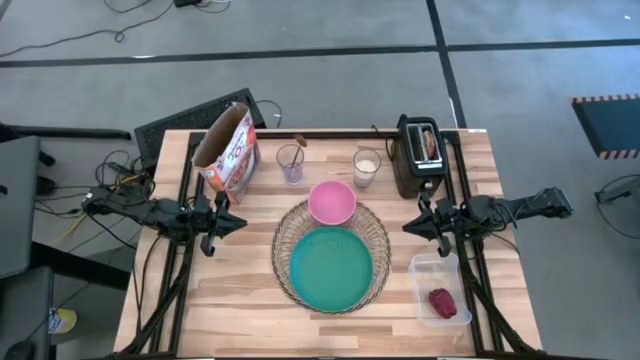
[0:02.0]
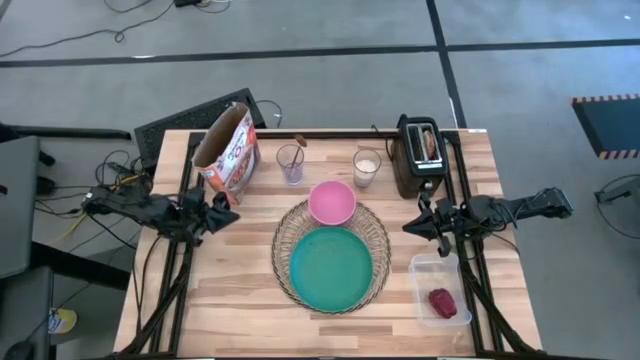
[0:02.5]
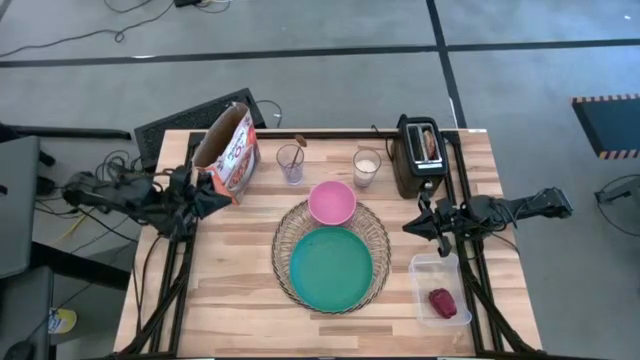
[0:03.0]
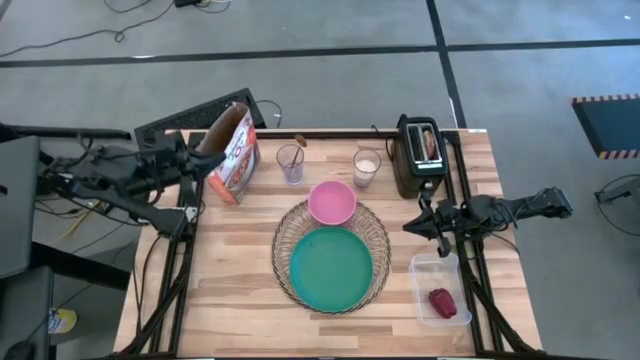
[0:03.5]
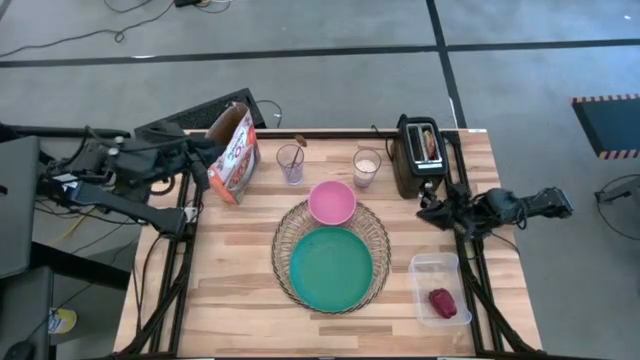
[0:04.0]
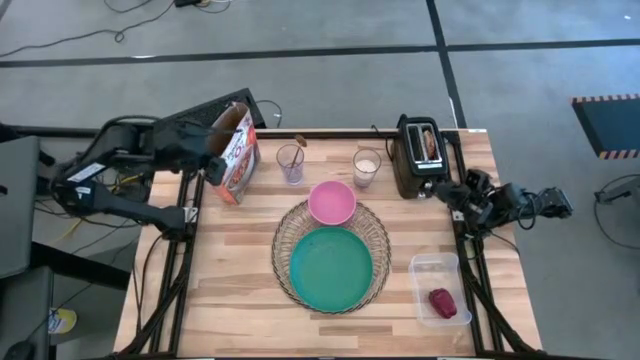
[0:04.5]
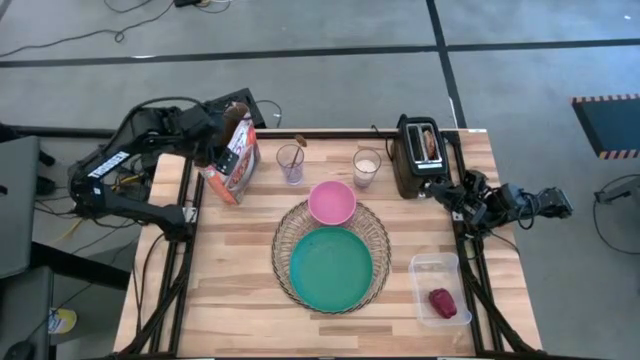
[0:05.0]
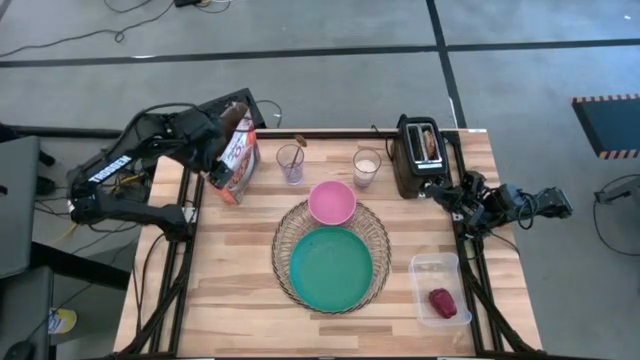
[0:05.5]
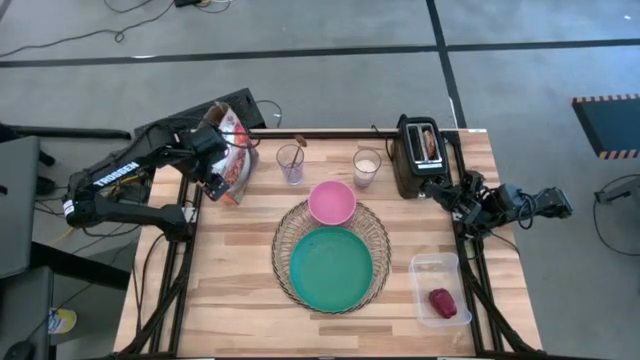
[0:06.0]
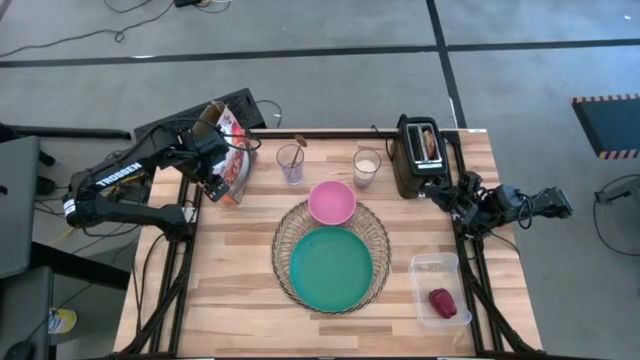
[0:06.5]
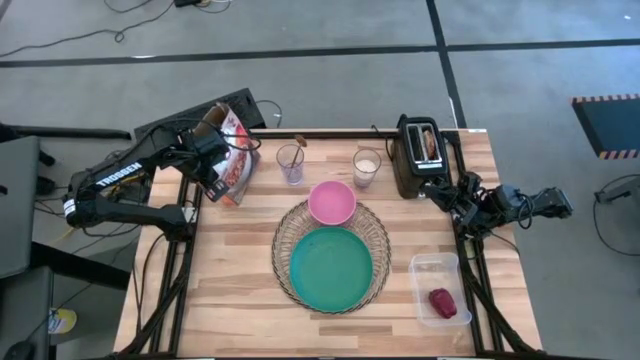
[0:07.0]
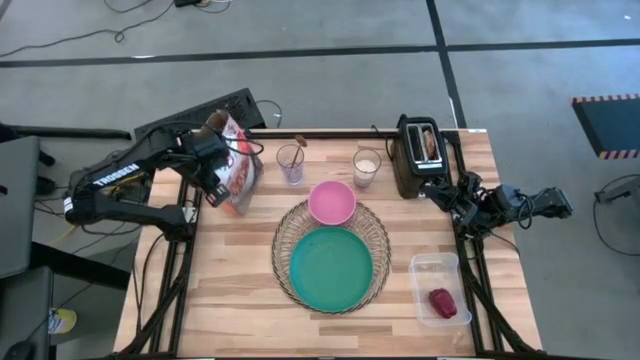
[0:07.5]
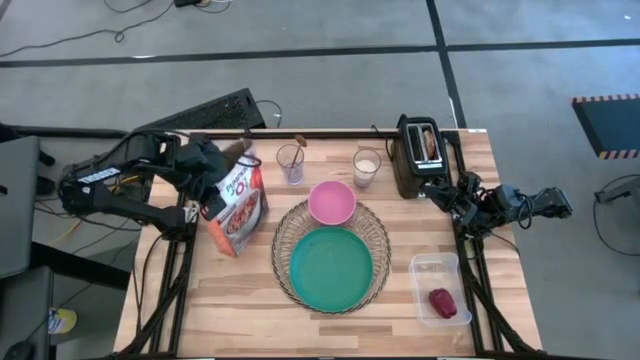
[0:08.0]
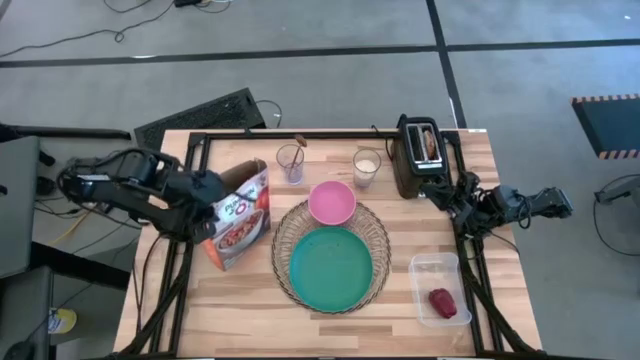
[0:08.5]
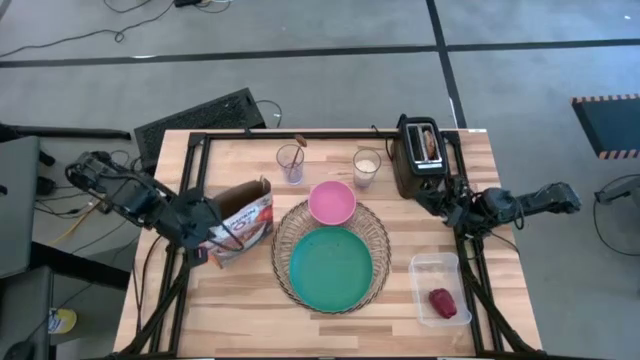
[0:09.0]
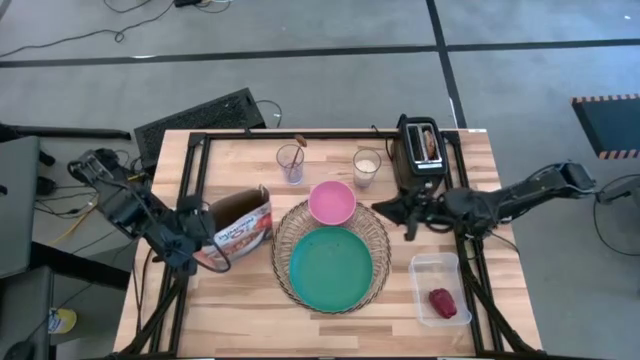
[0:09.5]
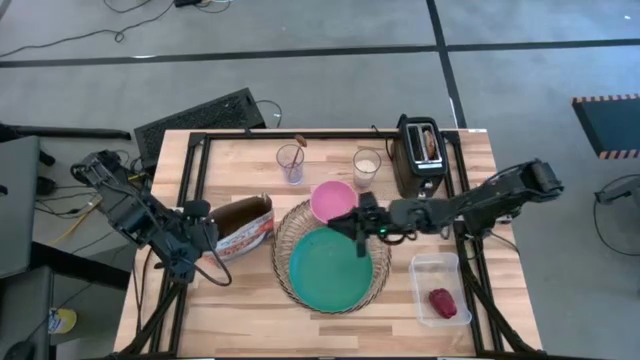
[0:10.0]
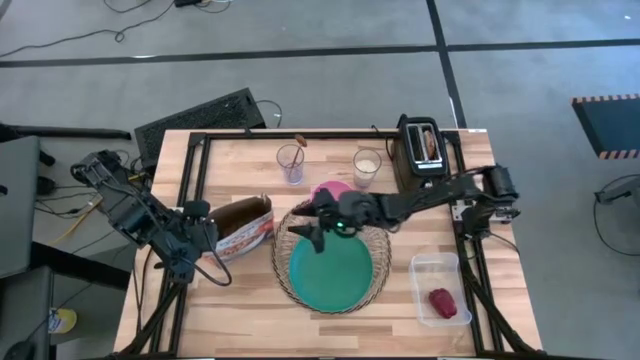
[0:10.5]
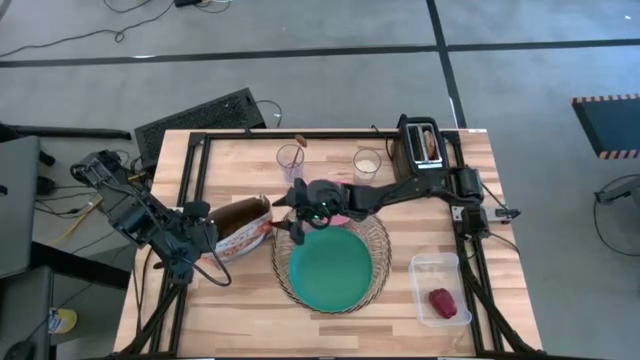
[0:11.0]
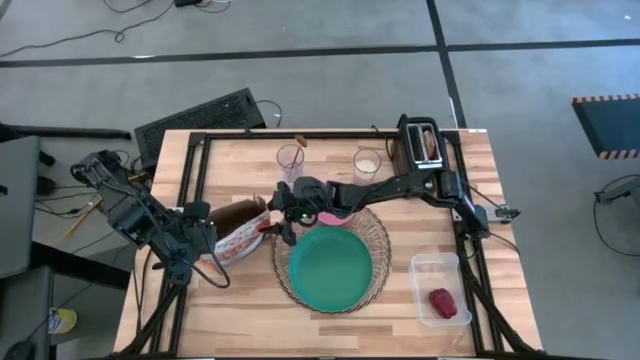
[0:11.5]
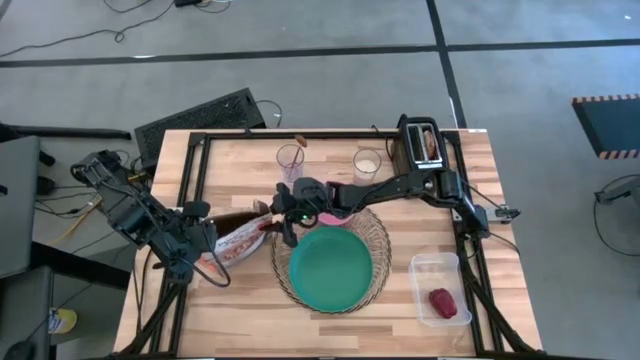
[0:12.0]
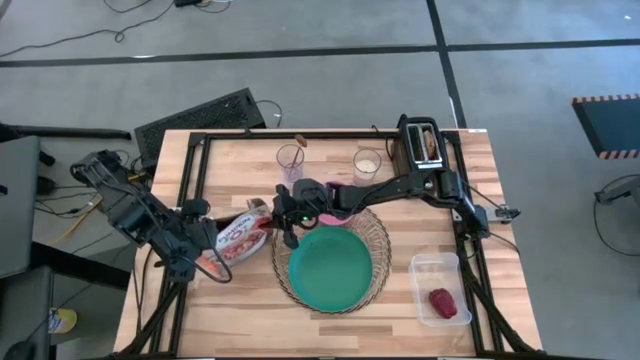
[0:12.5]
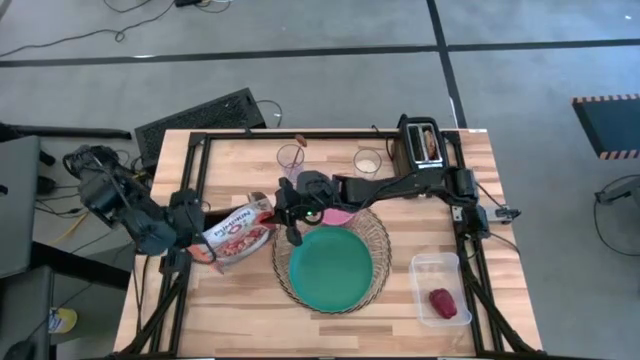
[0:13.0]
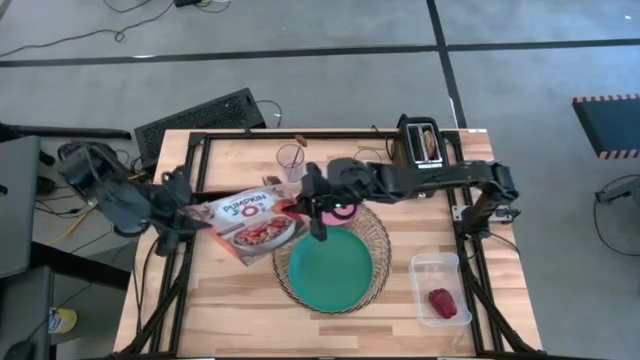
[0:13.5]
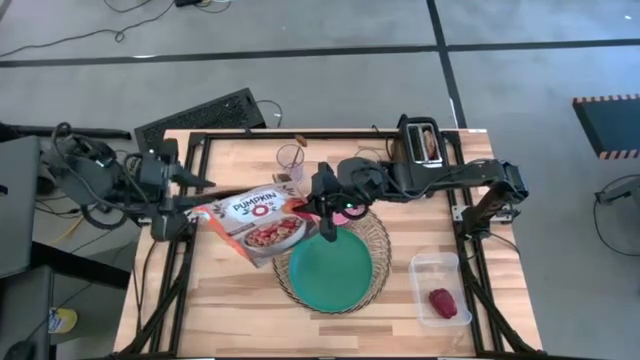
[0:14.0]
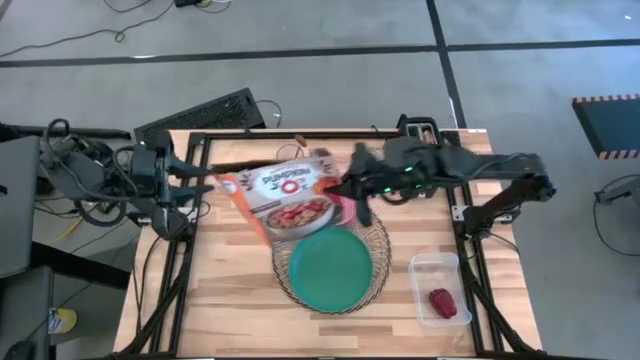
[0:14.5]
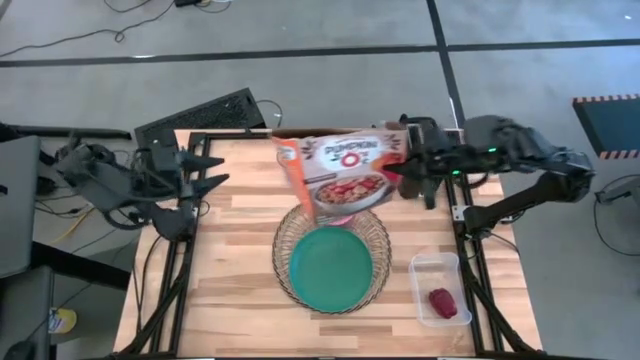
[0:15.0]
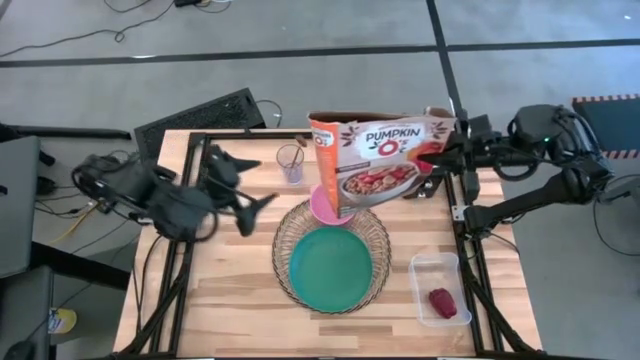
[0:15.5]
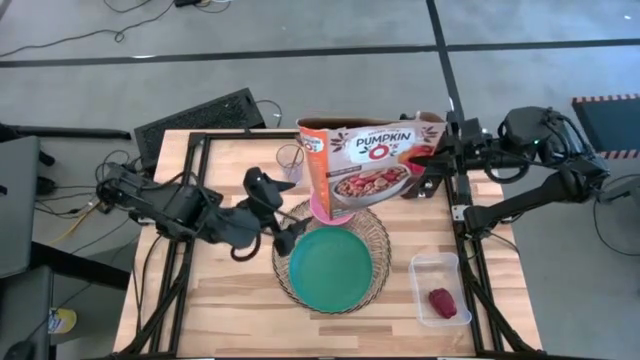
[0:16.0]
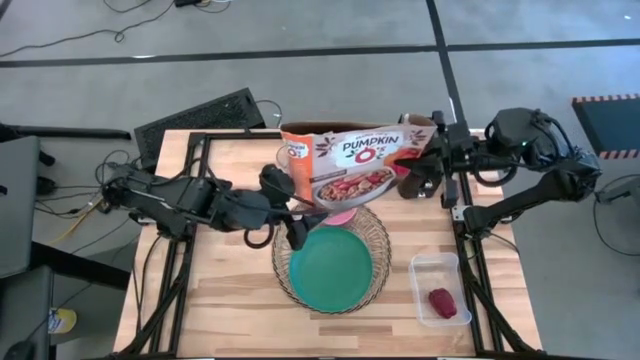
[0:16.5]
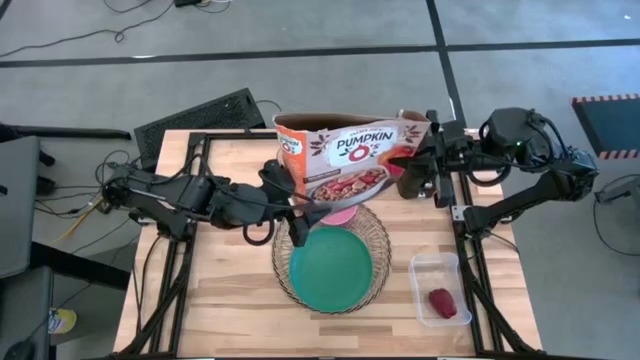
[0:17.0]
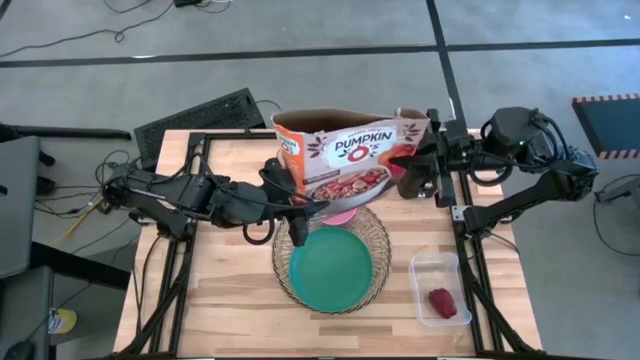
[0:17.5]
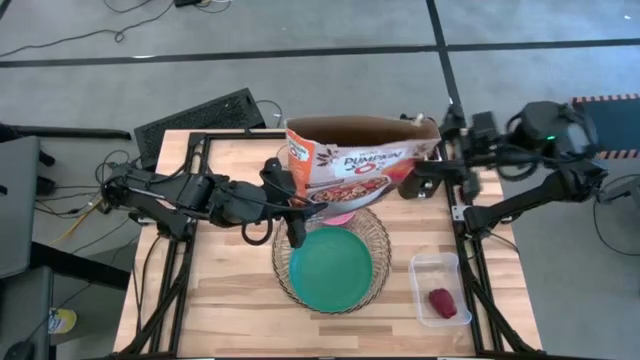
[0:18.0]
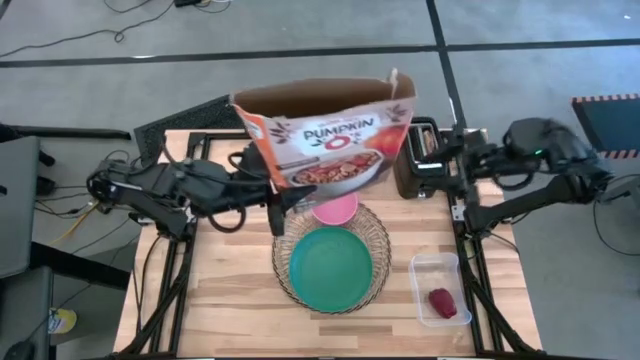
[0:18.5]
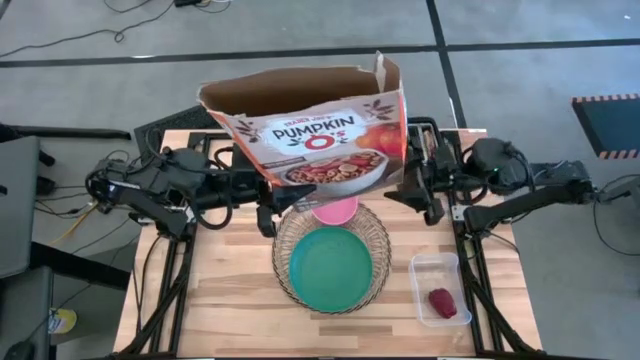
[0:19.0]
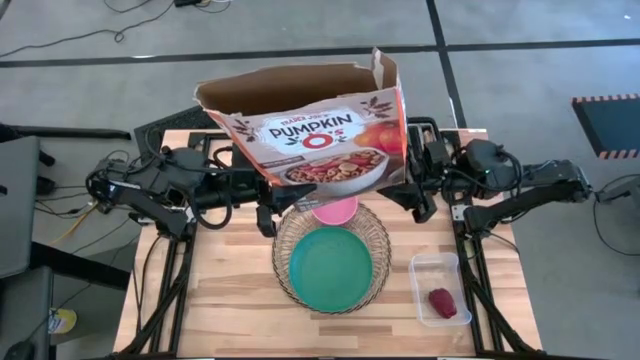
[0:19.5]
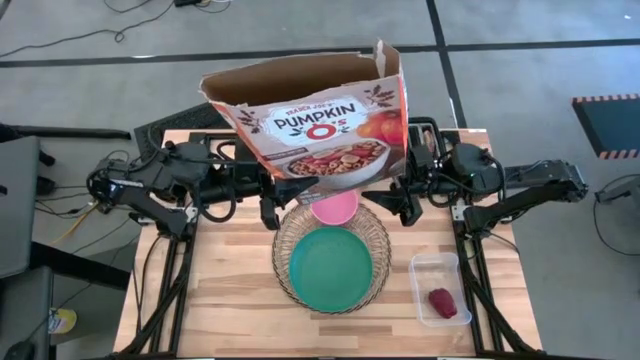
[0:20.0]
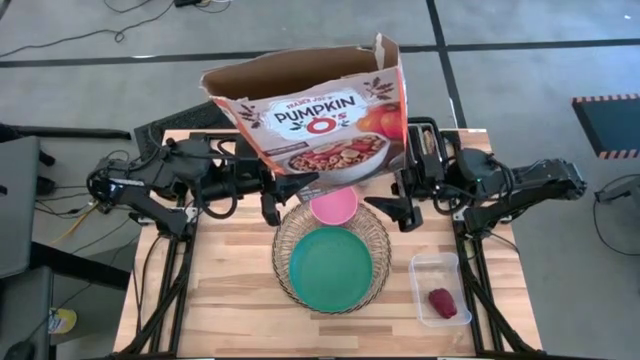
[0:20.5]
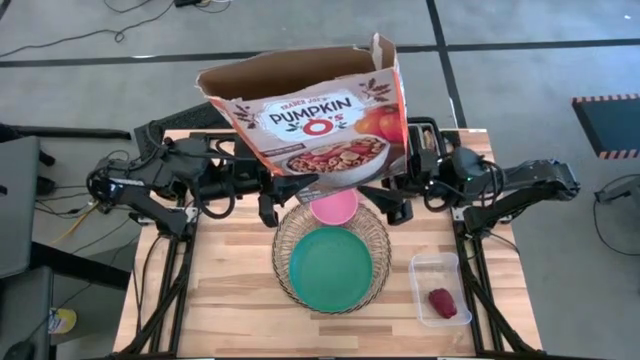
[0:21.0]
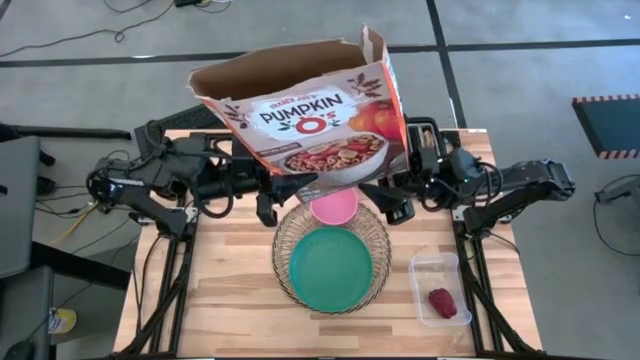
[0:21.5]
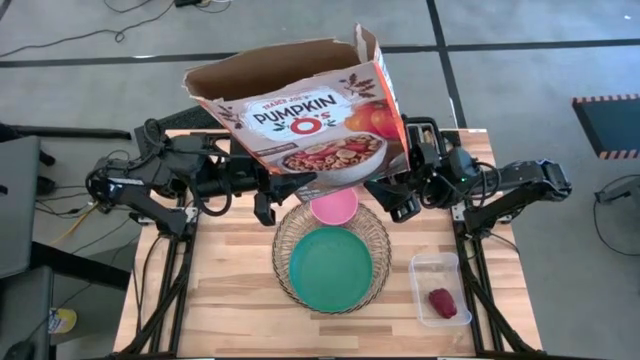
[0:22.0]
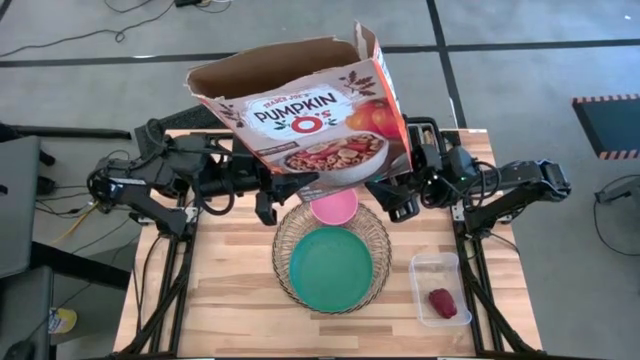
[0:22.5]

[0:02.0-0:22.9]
Task: Arrange a breakfast setting
Pour the cereal from the orange cereal box into the pink bowl
